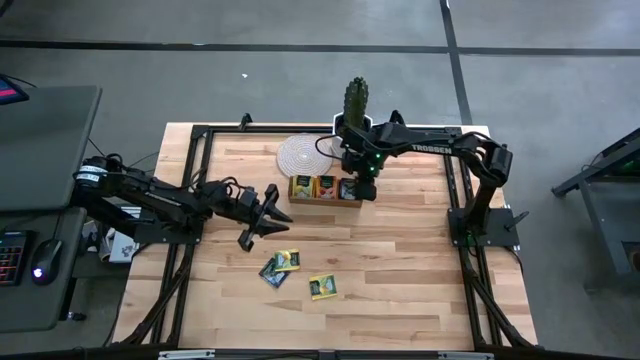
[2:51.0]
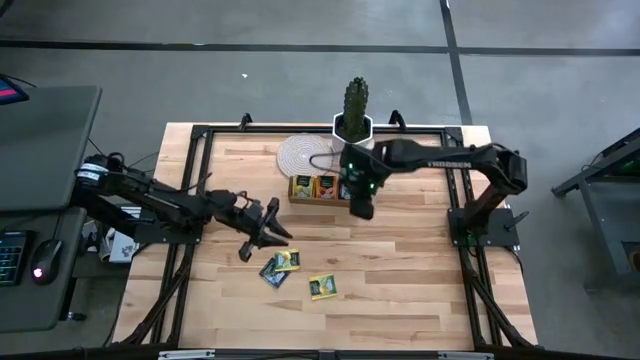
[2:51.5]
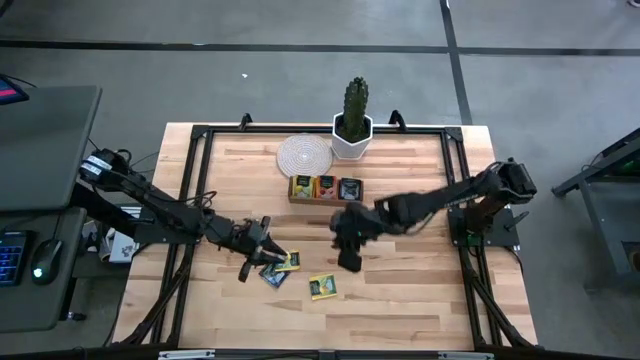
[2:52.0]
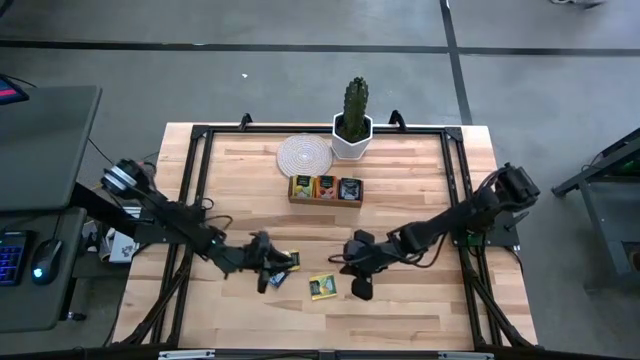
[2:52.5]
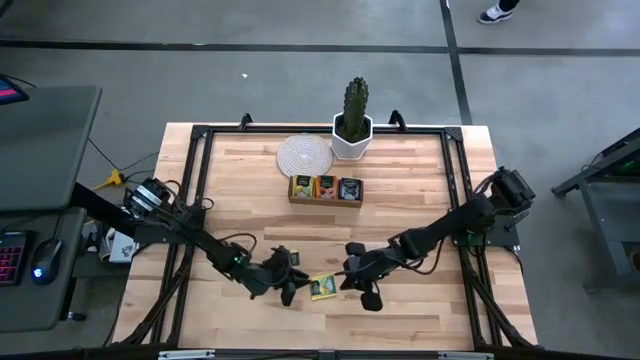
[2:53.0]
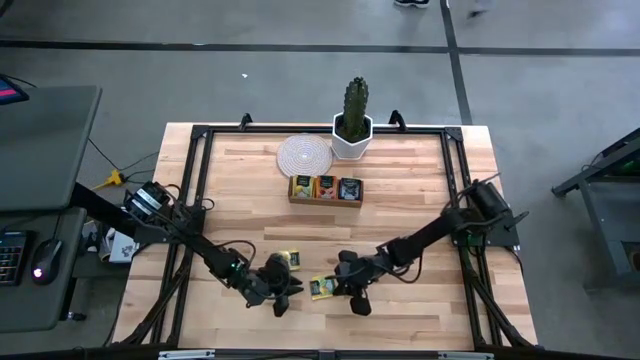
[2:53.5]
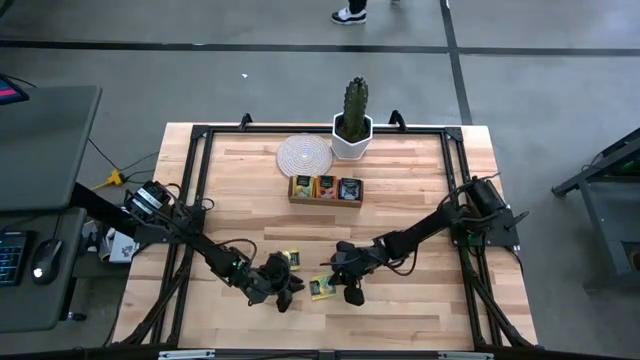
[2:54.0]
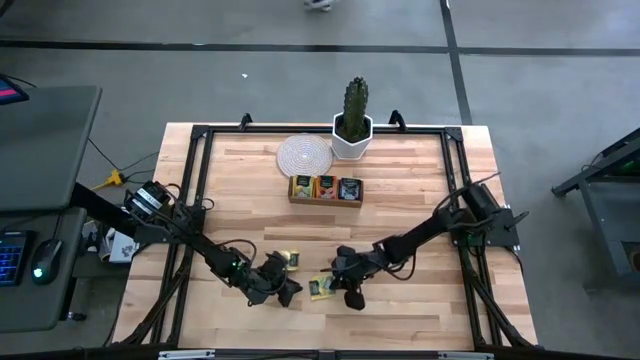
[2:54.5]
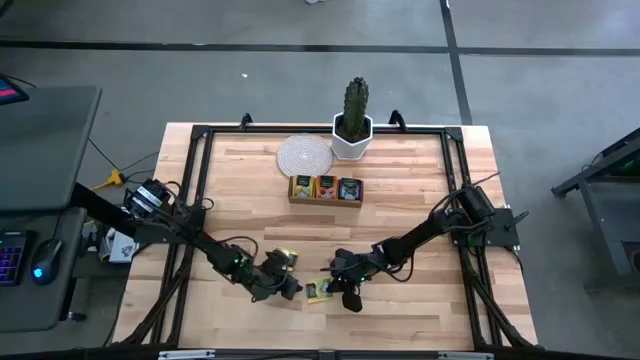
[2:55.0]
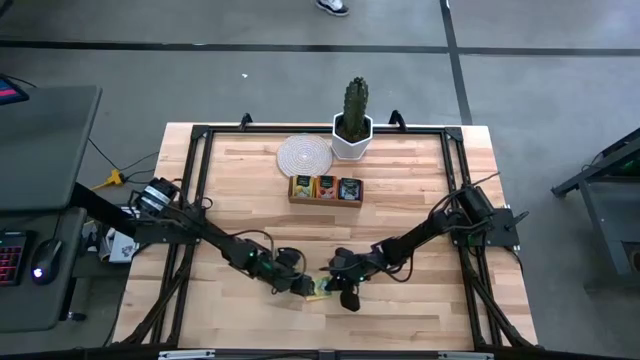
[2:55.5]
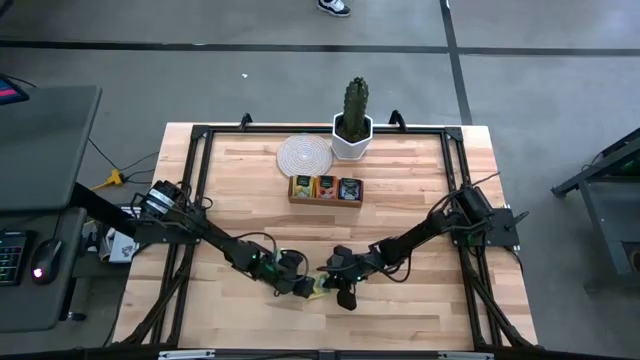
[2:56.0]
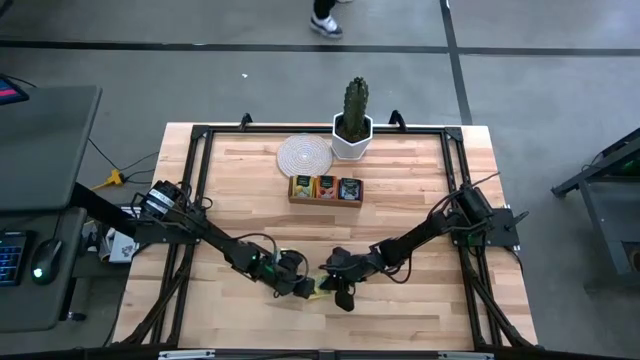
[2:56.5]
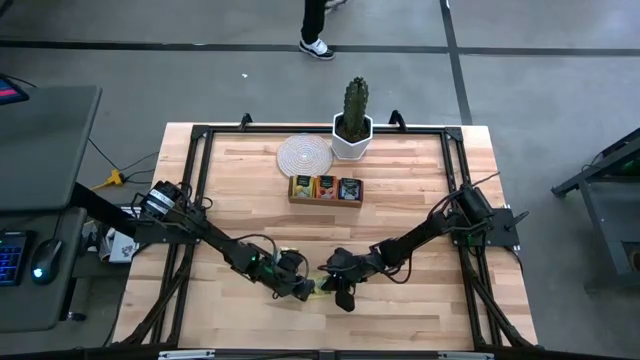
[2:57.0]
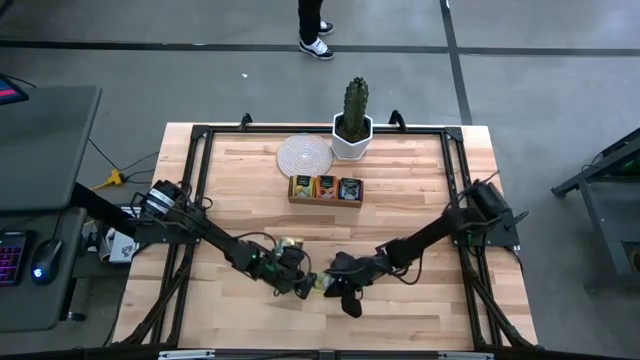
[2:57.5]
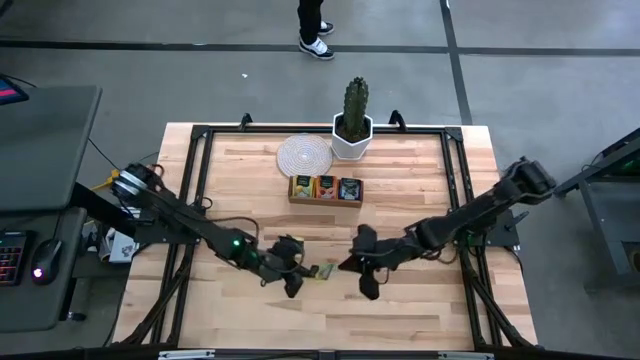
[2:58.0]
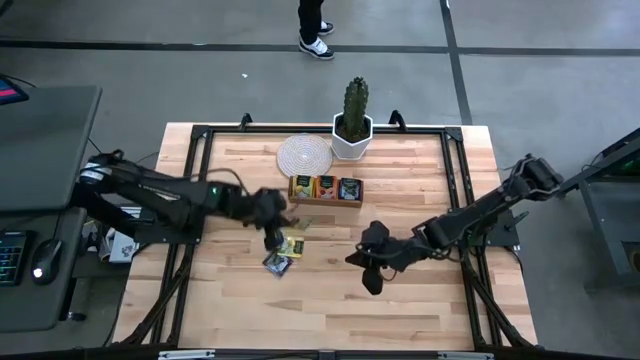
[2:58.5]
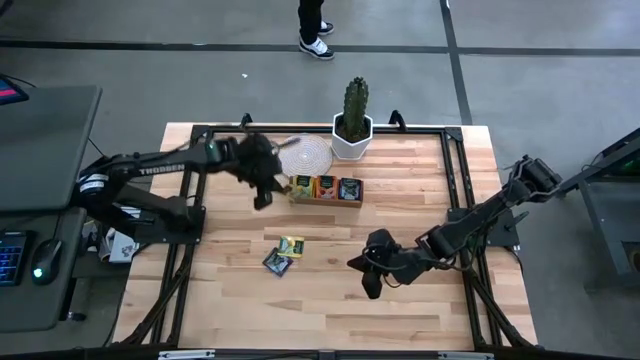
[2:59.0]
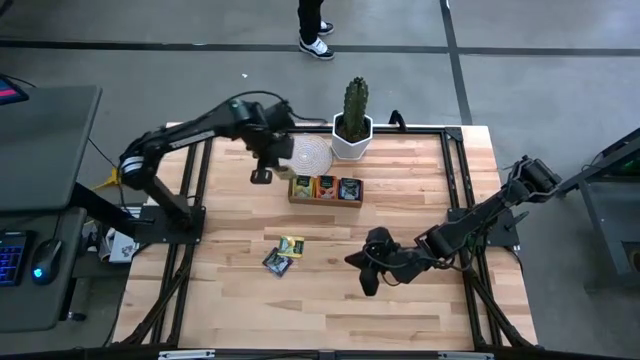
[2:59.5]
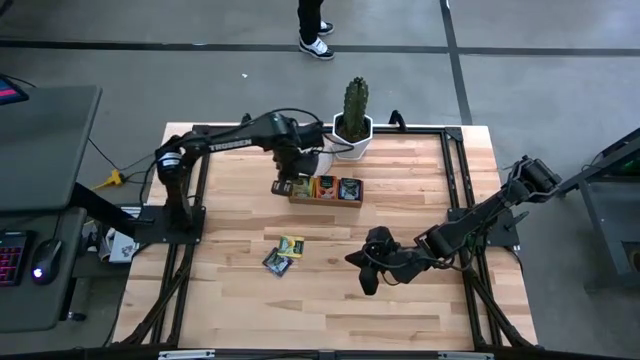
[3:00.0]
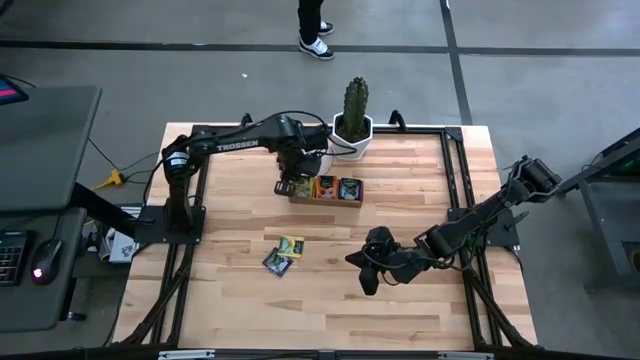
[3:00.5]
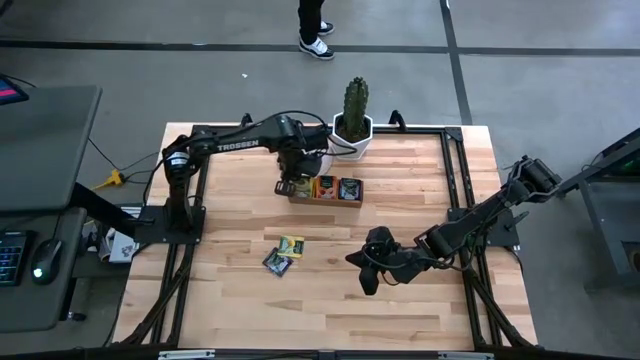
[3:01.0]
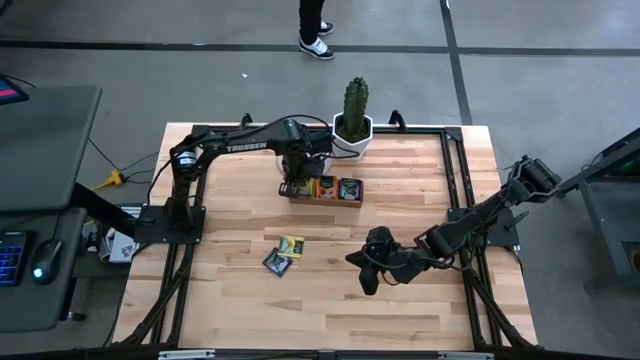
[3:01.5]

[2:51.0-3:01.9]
Task: Pick & Place Tea
Put the yellow tea bag into the left section of the wooden organizer

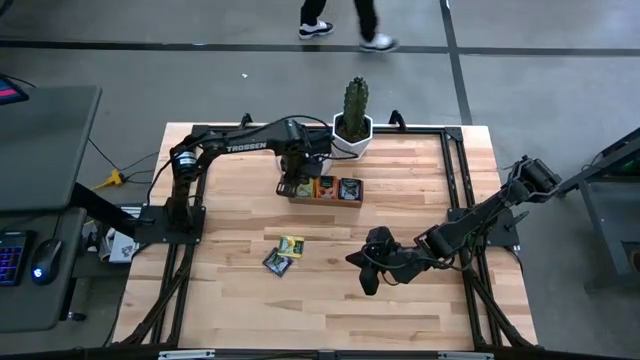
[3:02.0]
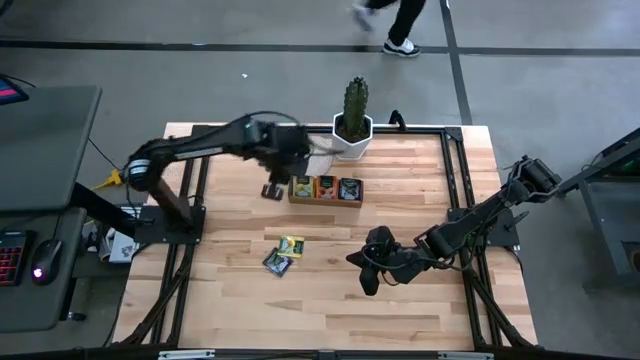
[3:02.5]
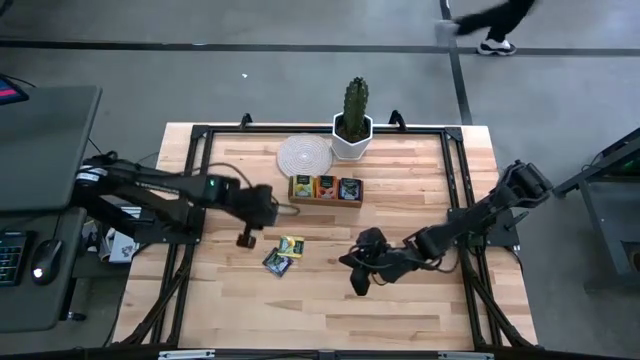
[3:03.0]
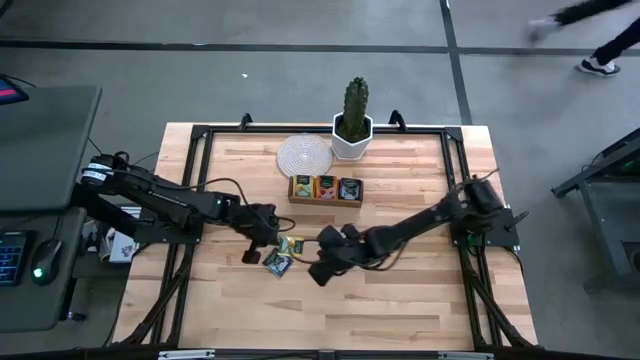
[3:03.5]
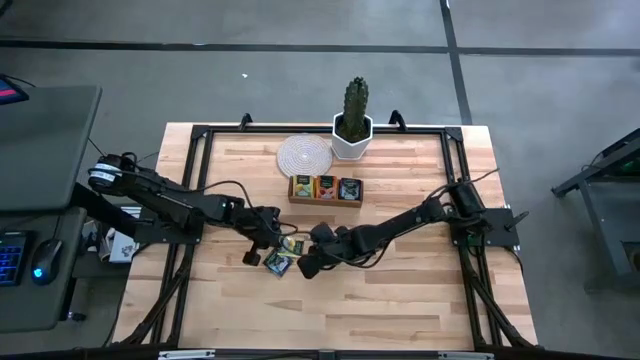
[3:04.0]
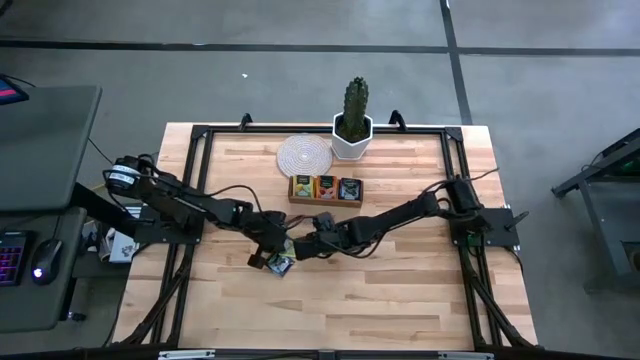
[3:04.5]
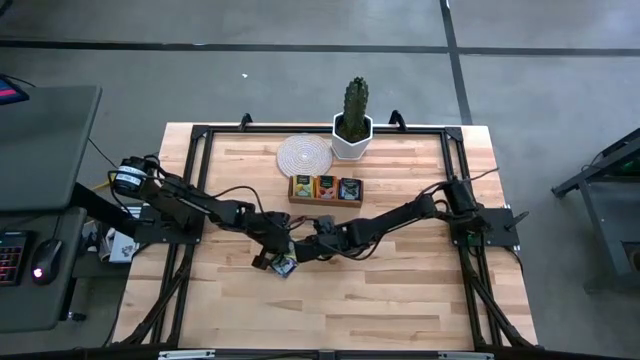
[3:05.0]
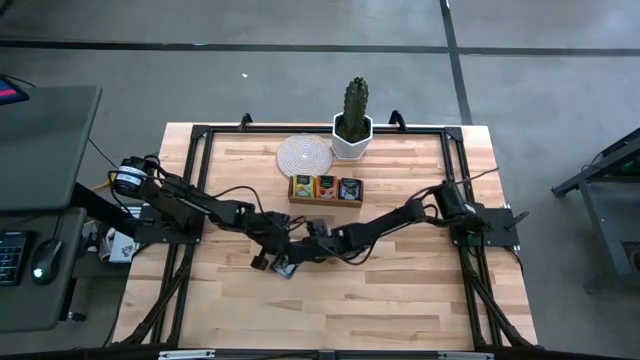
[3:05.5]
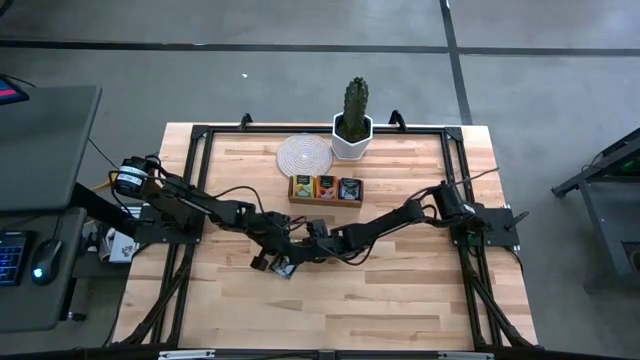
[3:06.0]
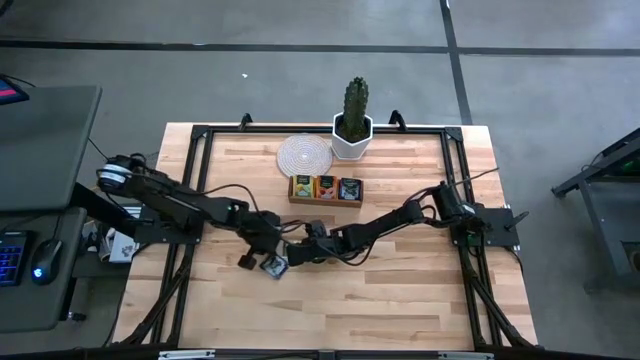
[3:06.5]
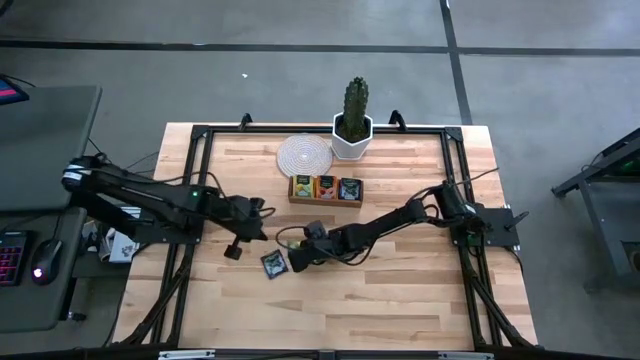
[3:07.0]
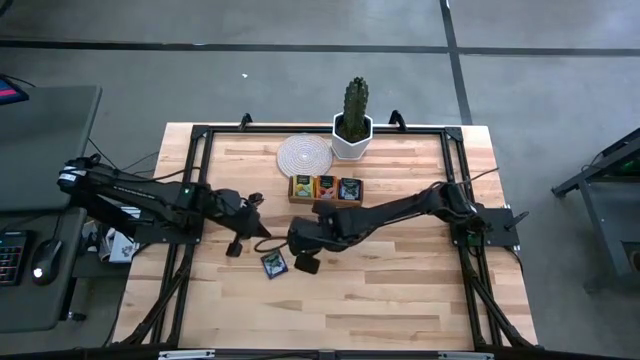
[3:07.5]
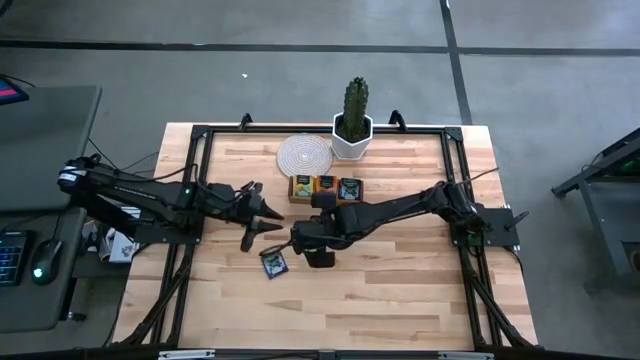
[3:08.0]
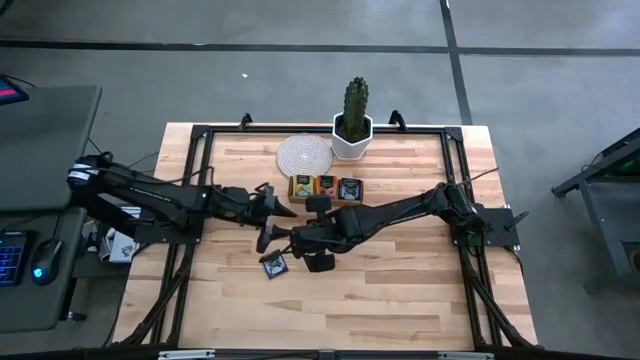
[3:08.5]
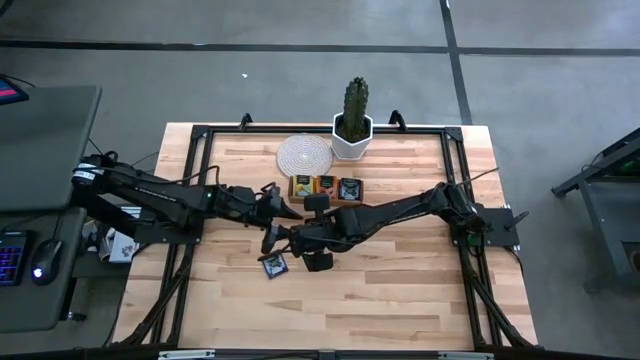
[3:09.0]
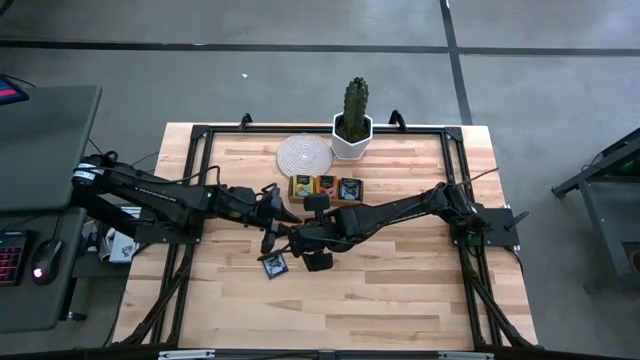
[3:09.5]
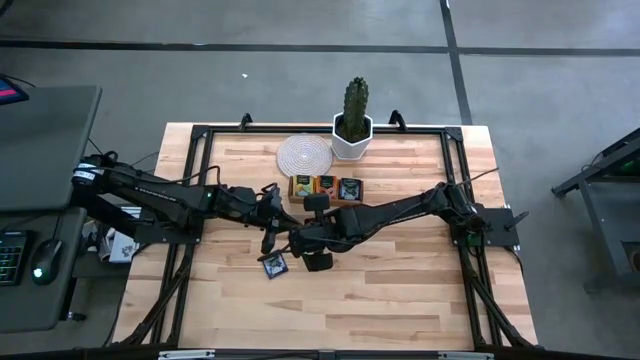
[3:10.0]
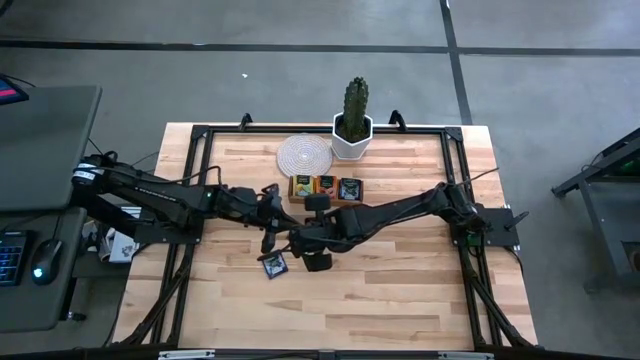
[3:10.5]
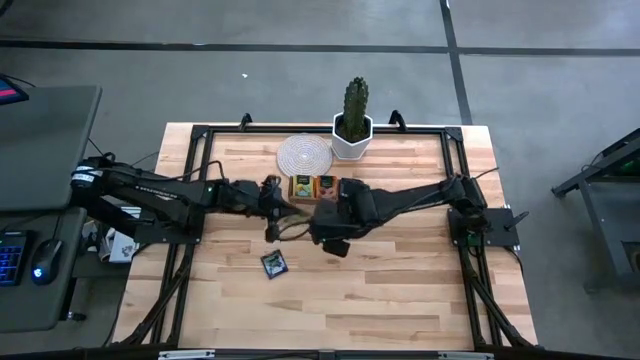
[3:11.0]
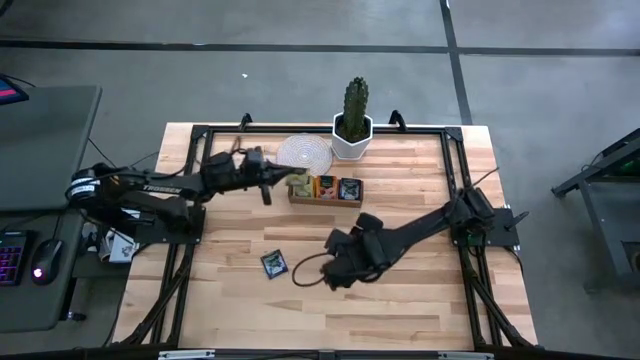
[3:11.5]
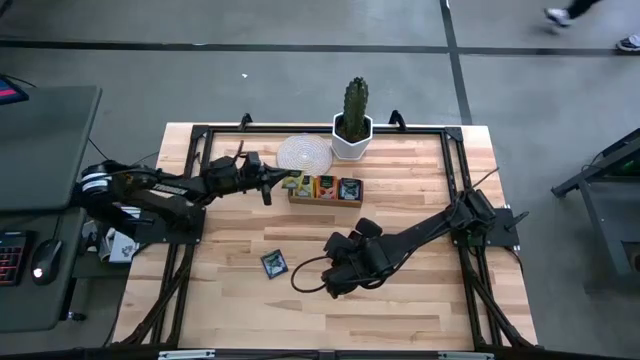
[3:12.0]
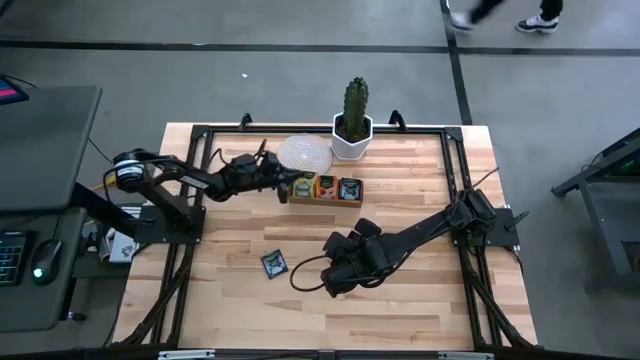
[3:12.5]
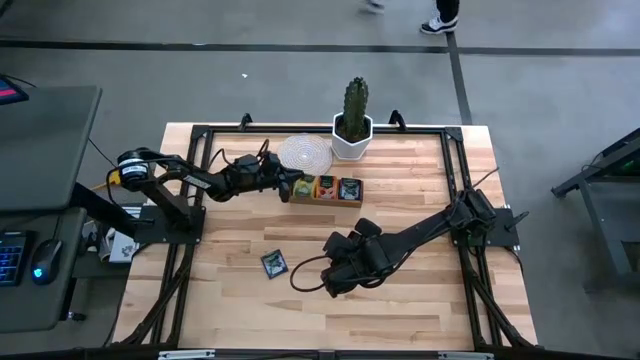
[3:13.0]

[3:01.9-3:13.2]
Put the yellow tea bag into the left section of the wooden organizer
